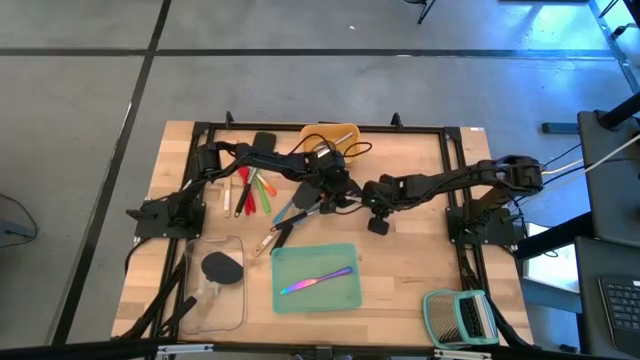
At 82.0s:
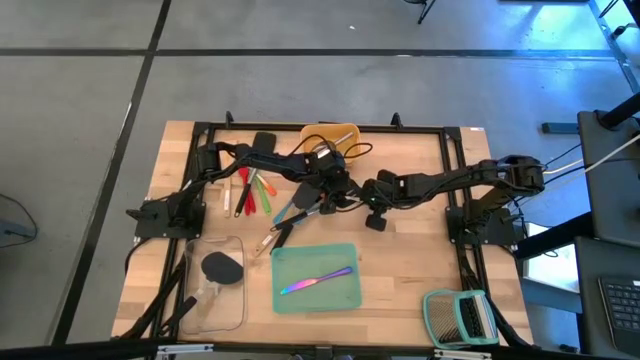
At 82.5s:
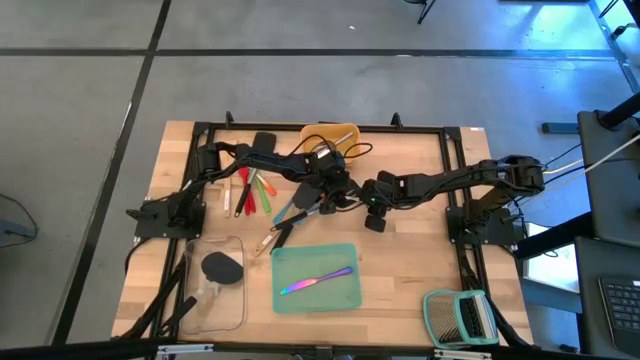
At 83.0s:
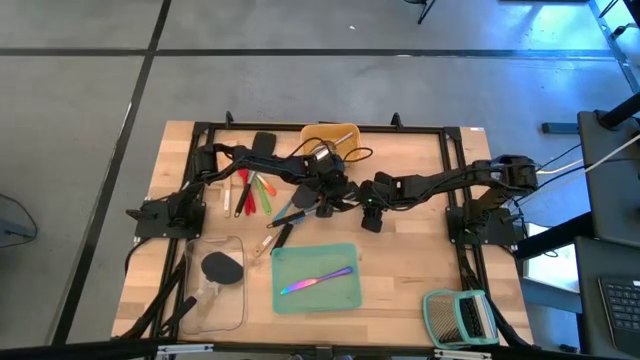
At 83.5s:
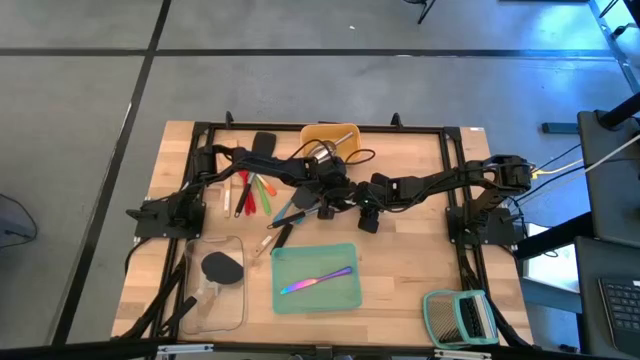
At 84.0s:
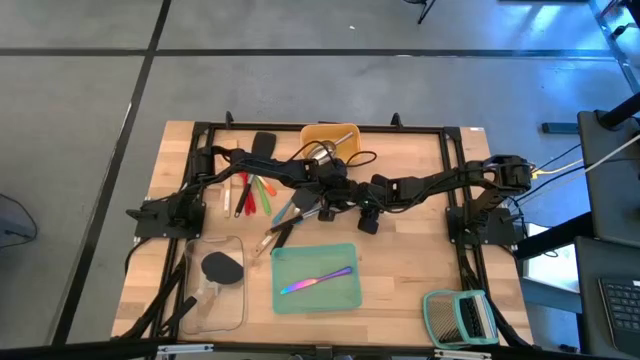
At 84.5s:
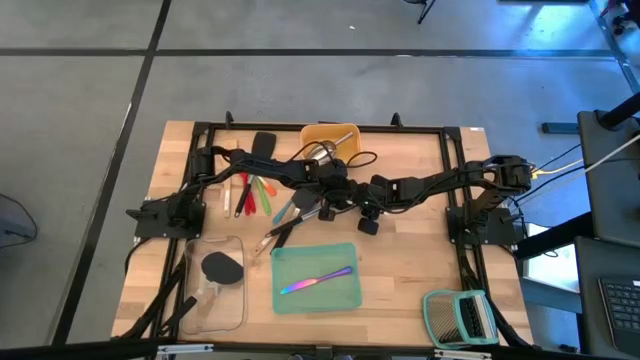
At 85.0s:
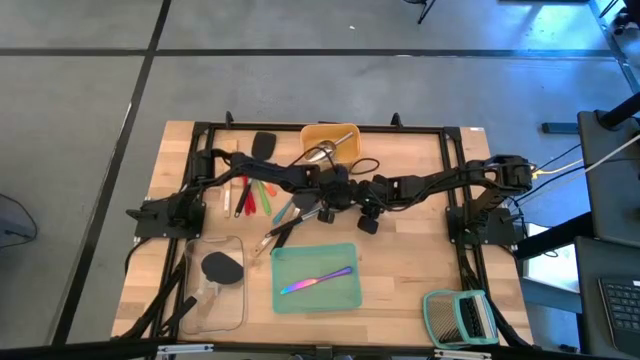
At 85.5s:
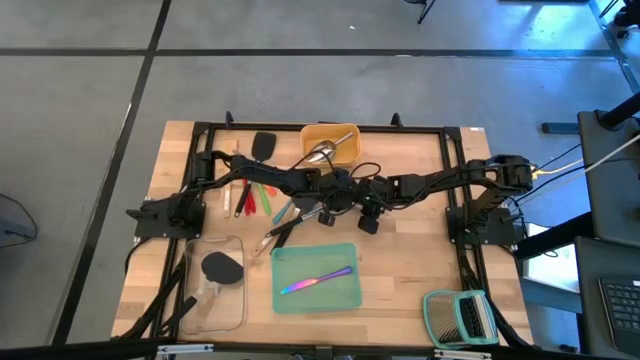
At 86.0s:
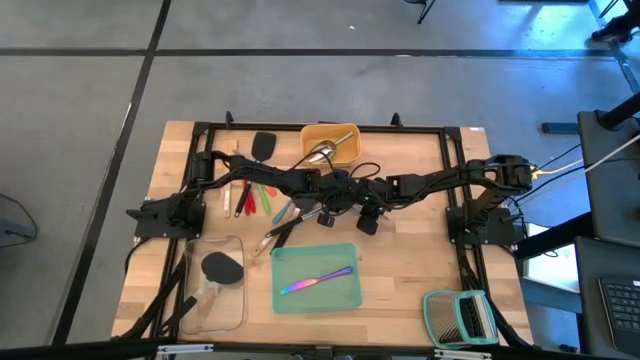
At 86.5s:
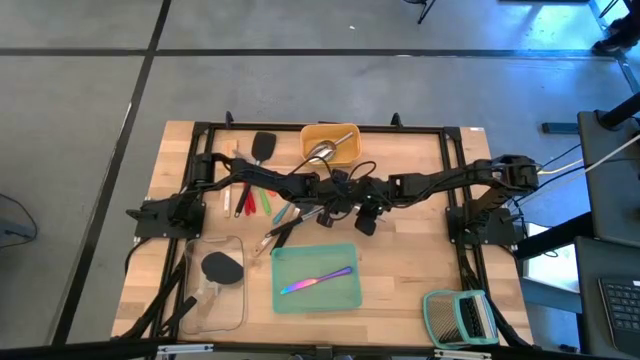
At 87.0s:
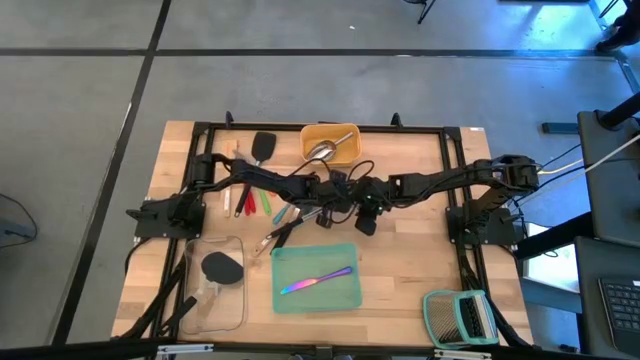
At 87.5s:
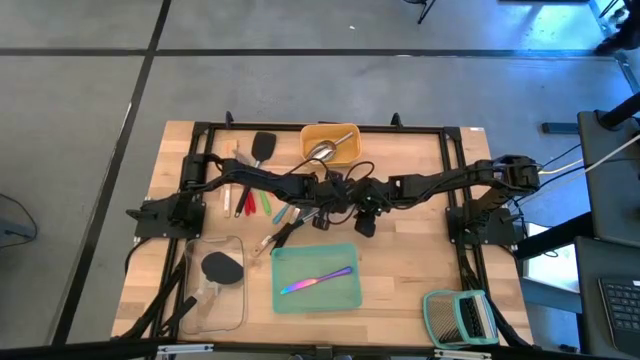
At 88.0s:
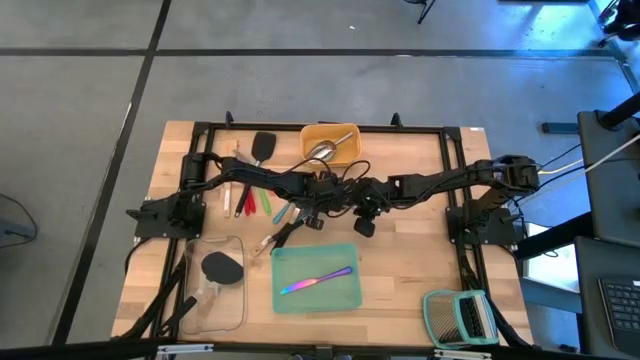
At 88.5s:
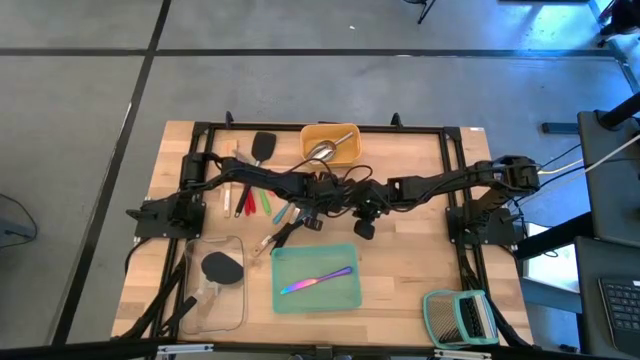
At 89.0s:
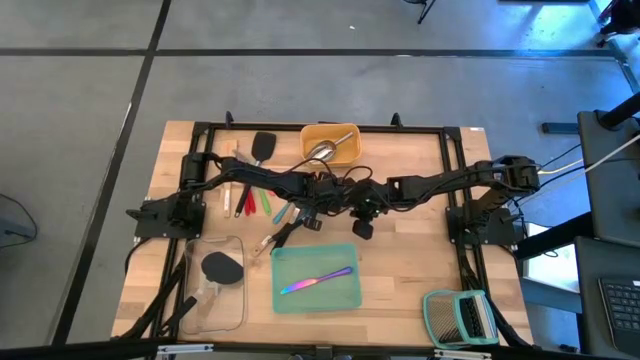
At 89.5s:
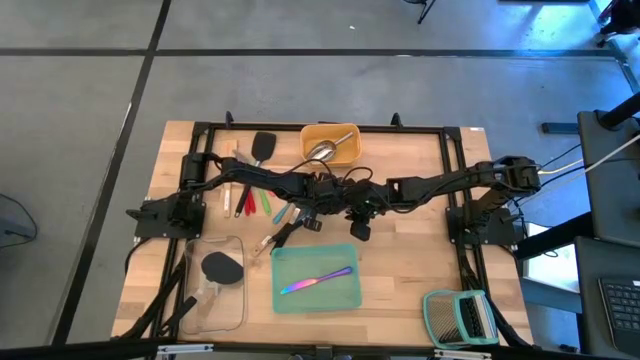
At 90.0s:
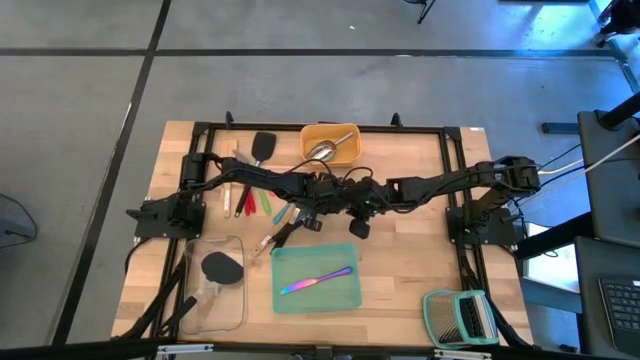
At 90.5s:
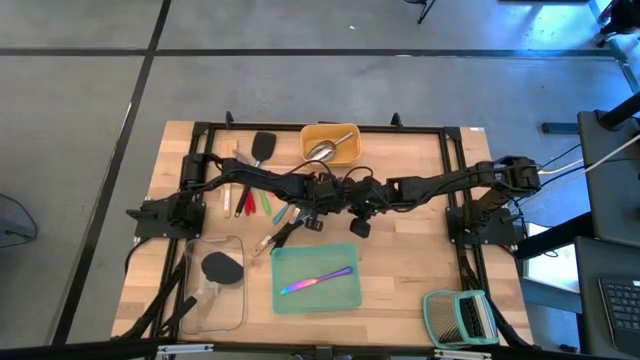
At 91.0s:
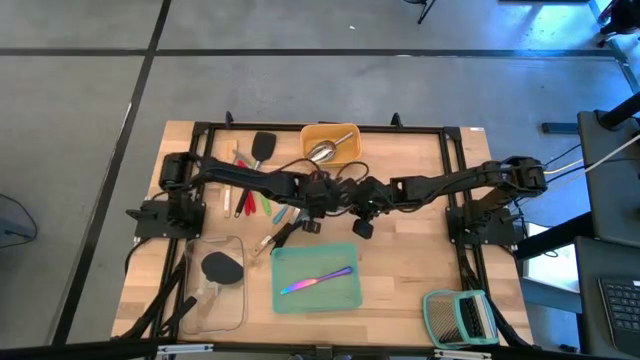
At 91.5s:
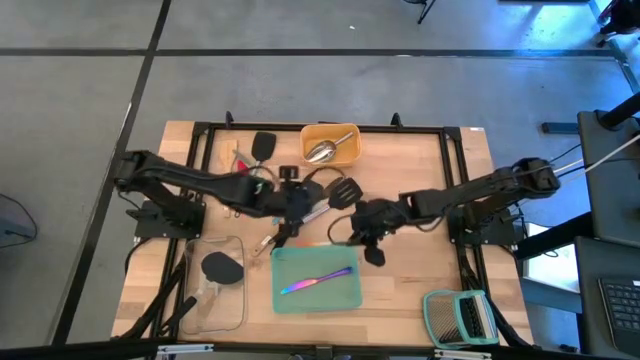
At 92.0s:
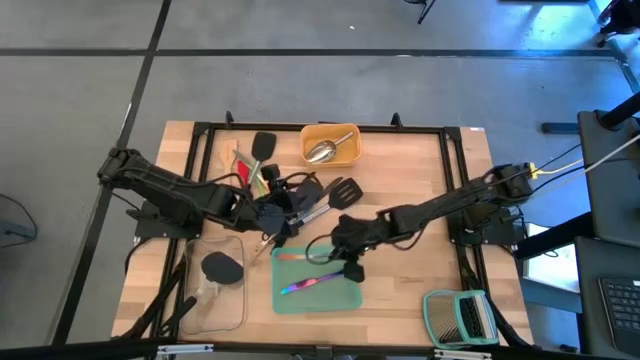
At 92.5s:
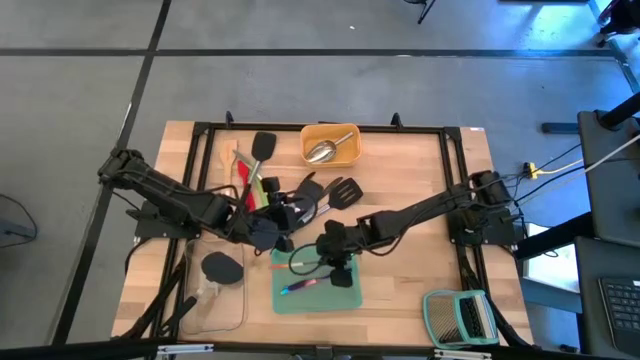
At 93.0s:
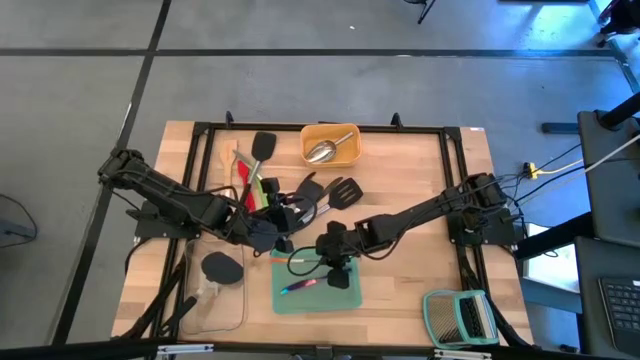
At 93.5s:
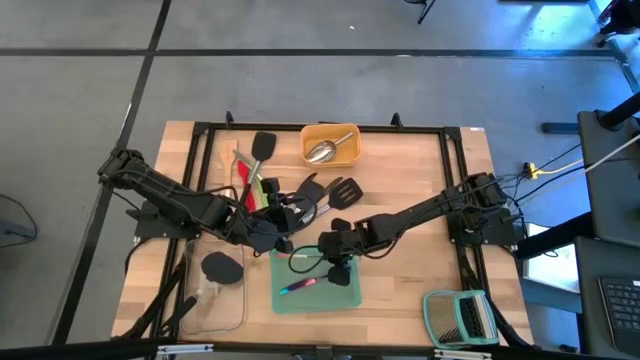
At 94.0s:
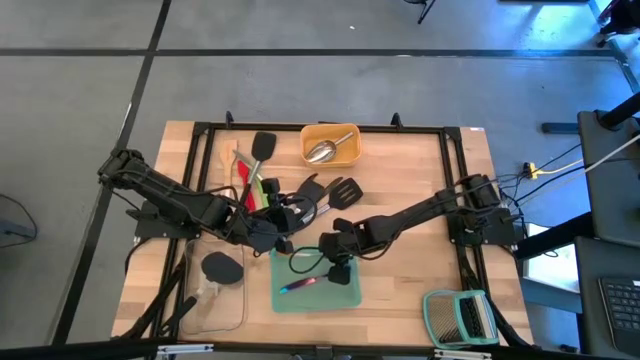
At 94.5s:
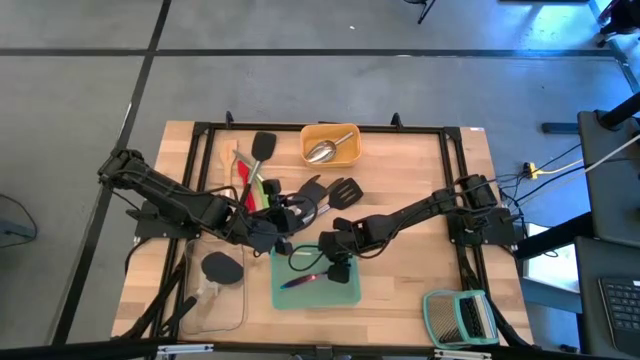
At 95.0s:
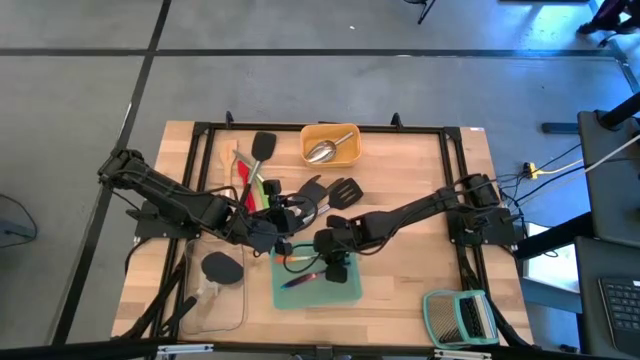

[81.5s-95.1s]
Task: Pick & Place Kitchen Items
Put the orange table knife into the green bin

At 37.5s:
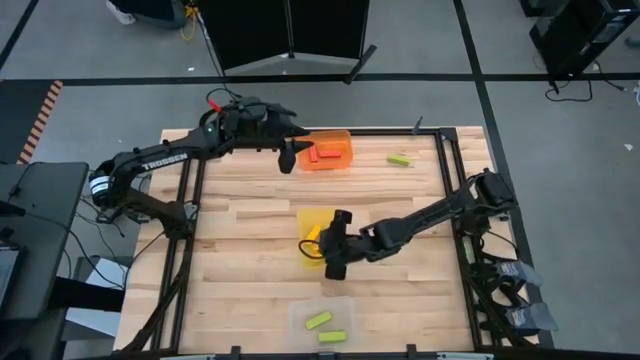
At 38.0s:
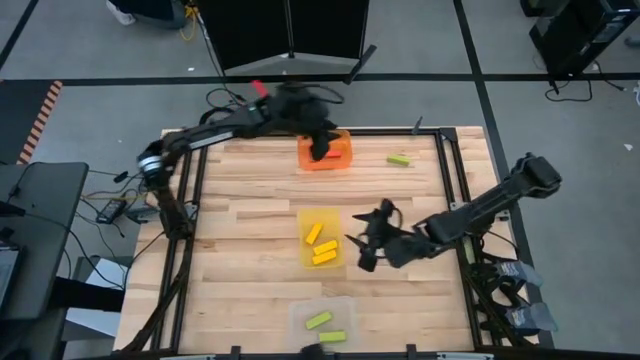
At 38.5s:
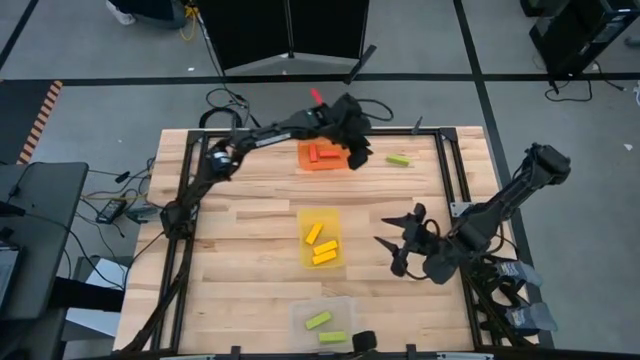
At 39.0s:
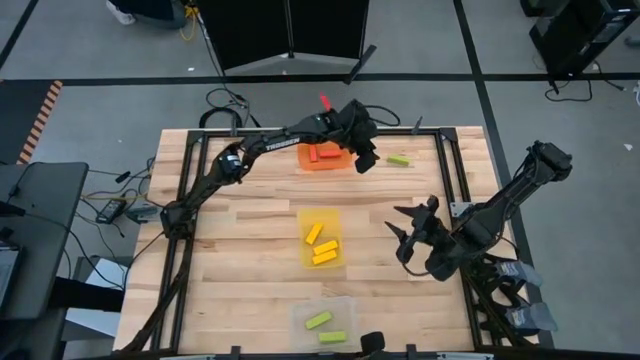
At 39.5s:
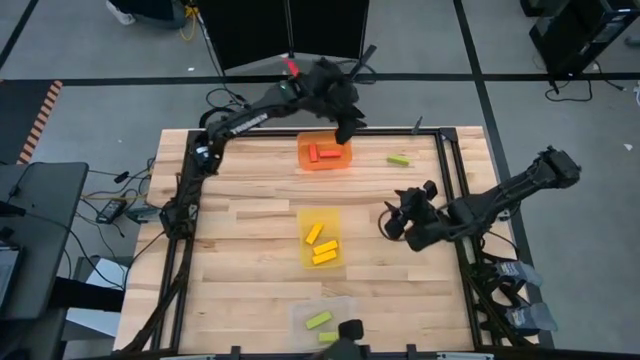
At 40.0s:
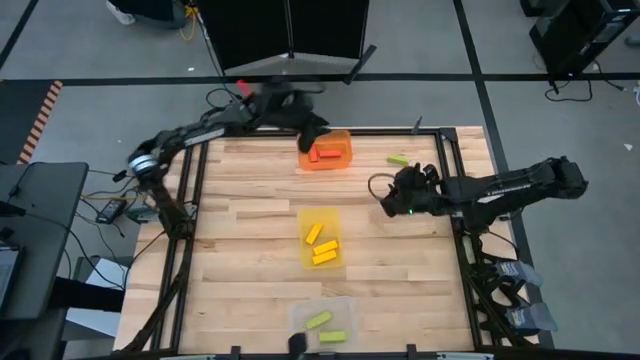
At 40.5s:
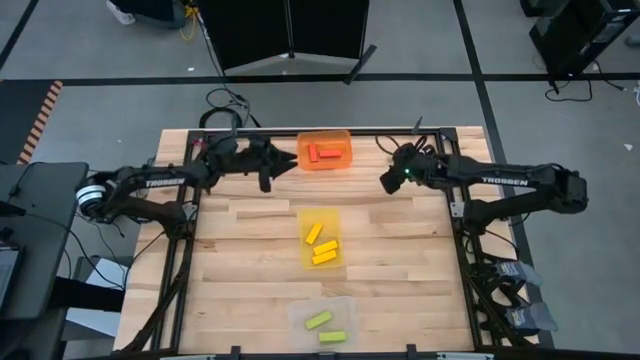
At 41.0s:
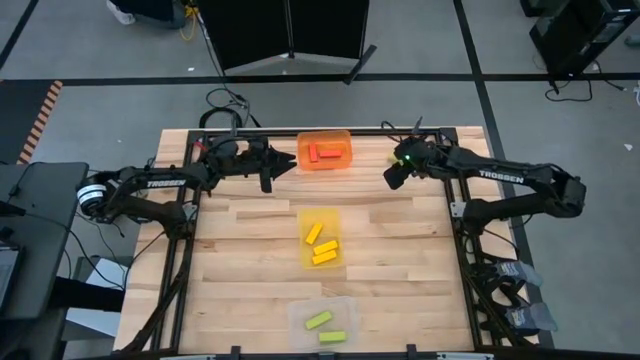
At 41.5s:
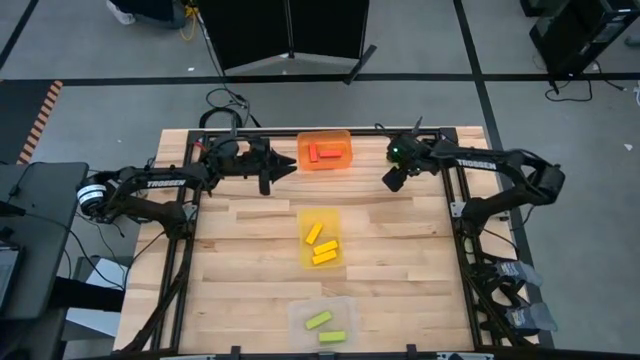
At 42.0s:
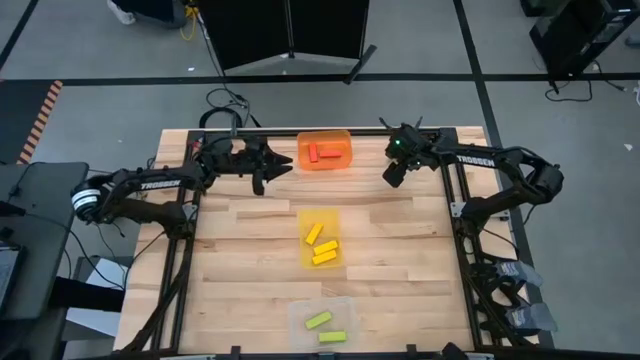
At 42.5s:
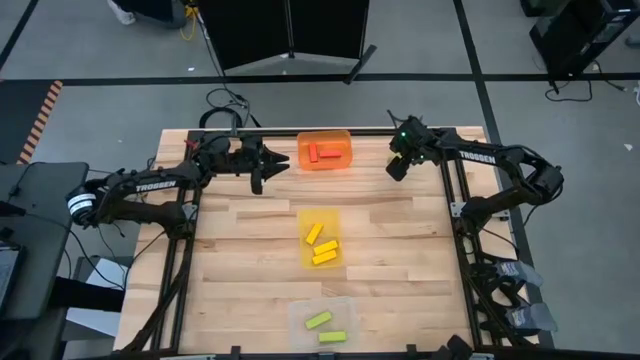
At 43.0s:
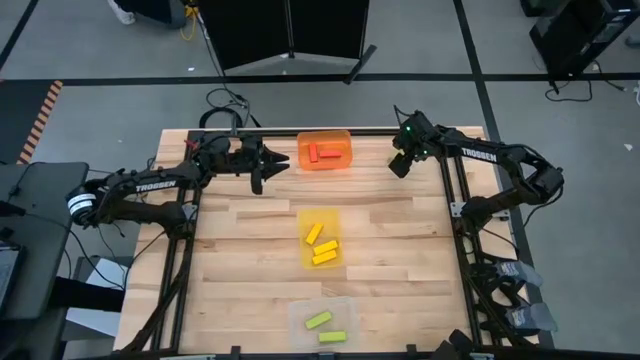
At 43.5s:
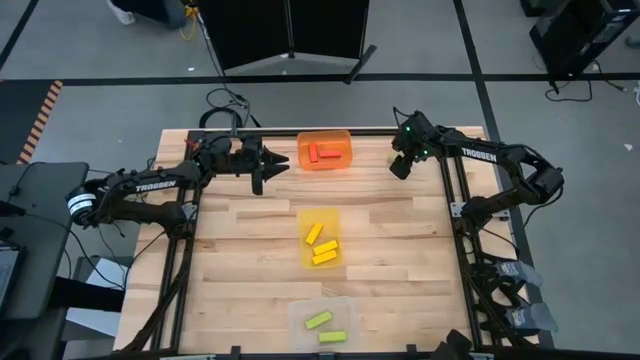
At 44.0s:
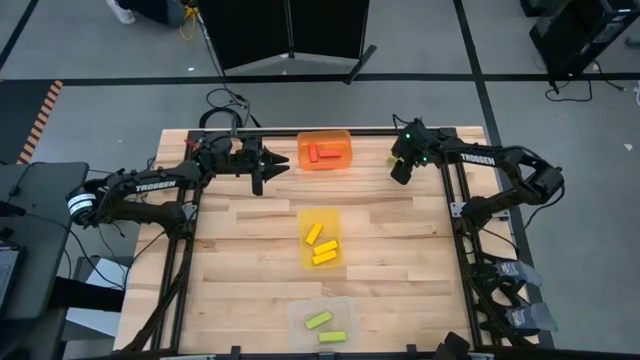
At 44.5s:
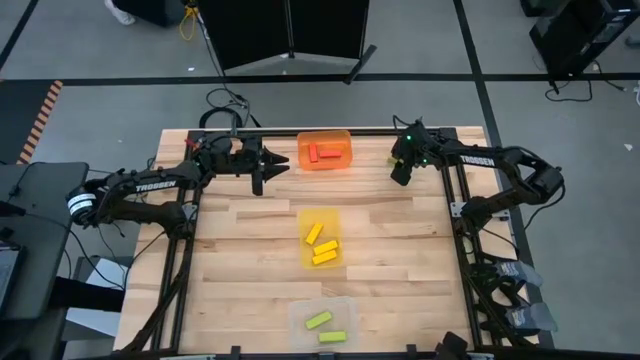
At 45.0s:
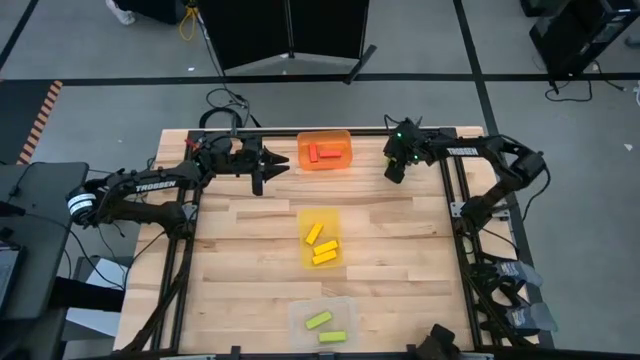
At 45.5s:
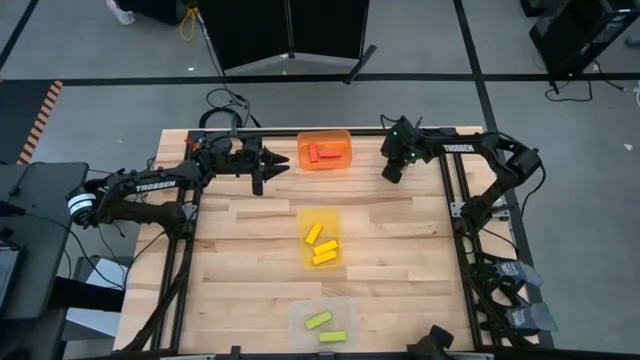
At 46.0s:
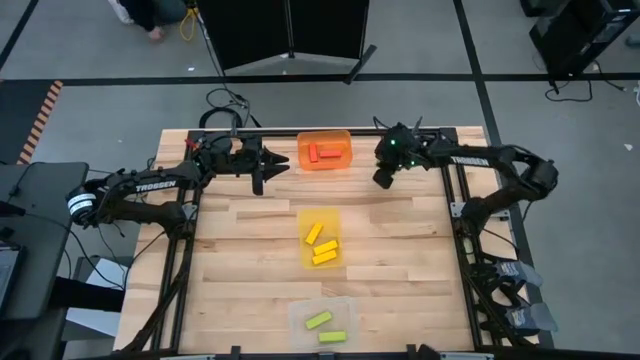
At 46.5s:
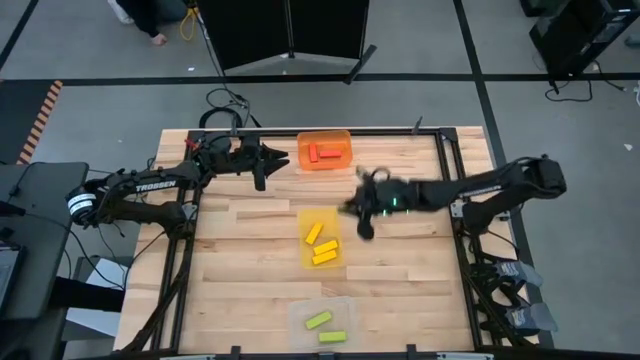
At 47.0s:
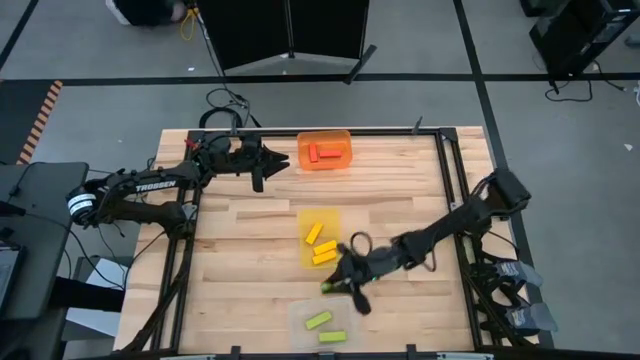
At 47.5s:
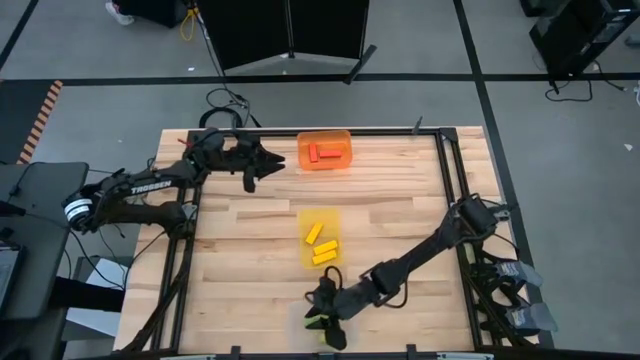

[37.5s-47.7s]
Task: Sort blocks
Put the green block into the transparent bin
